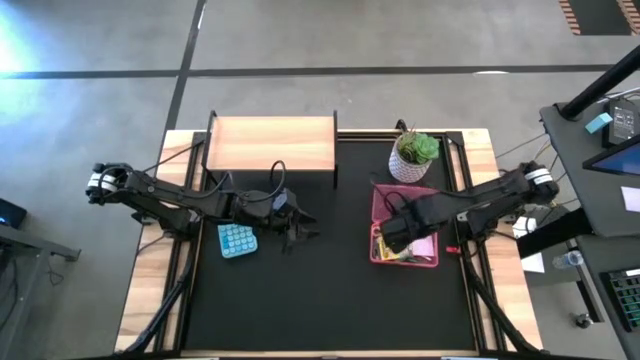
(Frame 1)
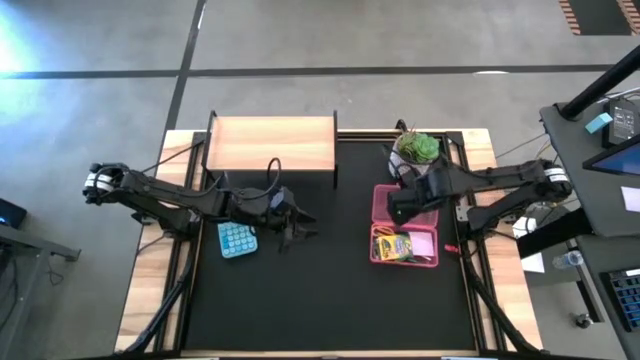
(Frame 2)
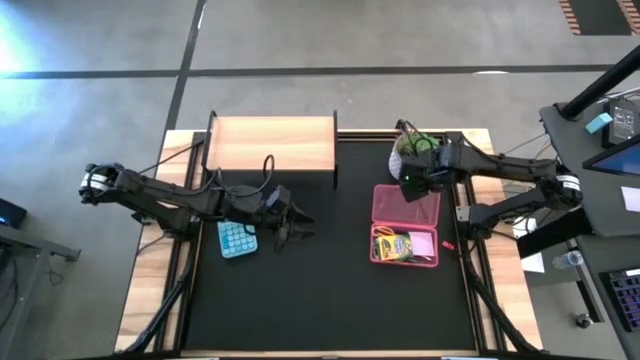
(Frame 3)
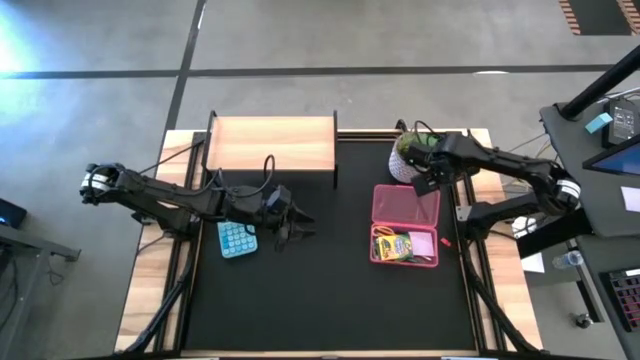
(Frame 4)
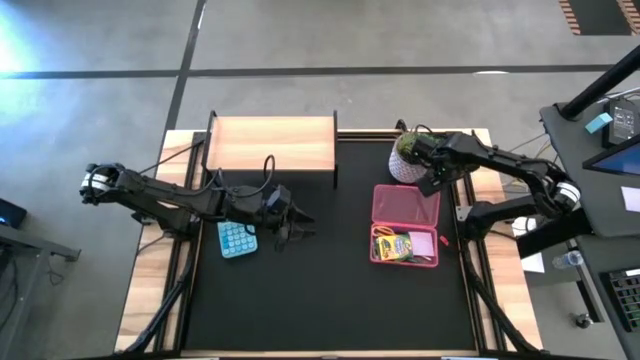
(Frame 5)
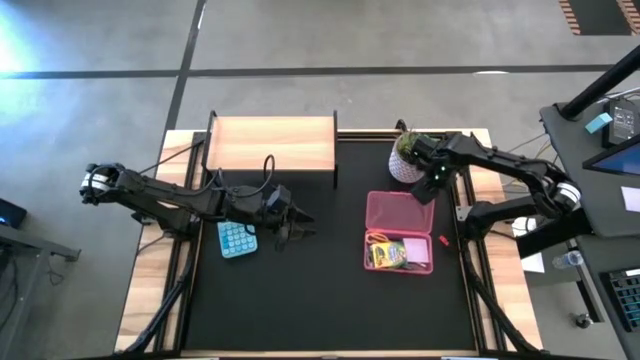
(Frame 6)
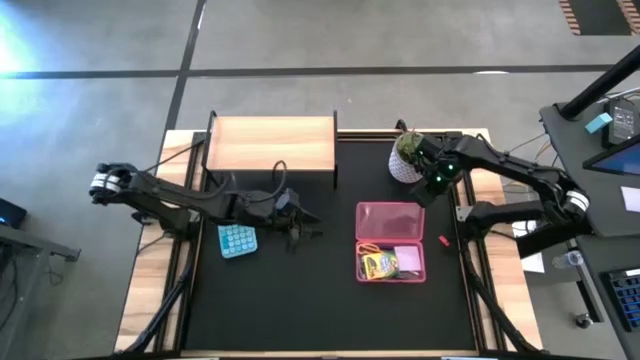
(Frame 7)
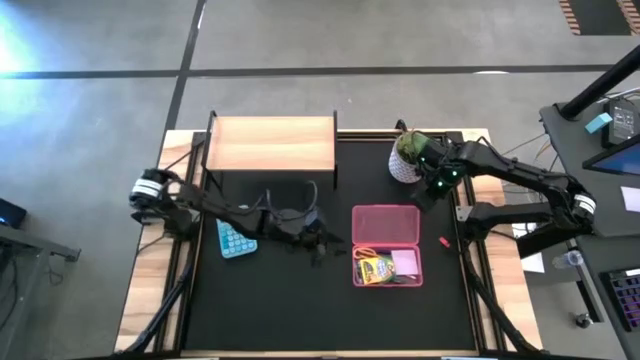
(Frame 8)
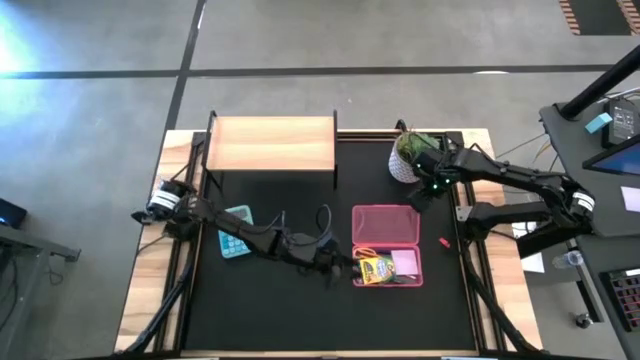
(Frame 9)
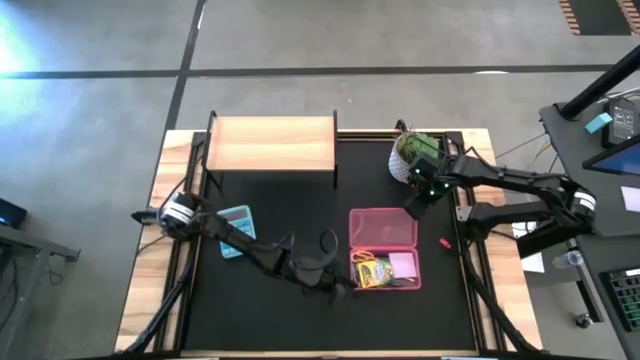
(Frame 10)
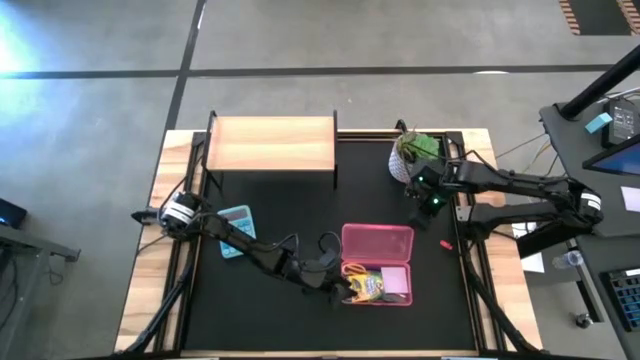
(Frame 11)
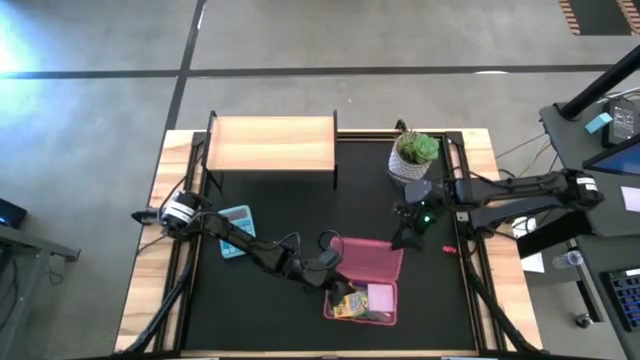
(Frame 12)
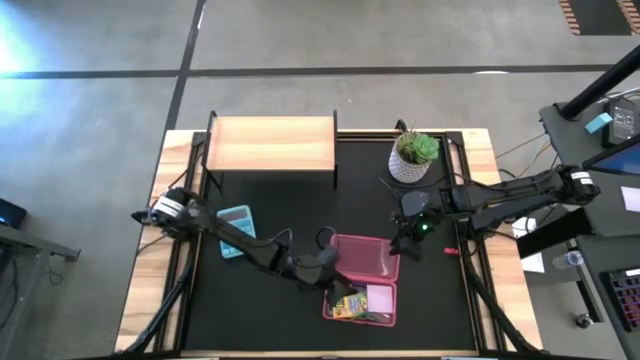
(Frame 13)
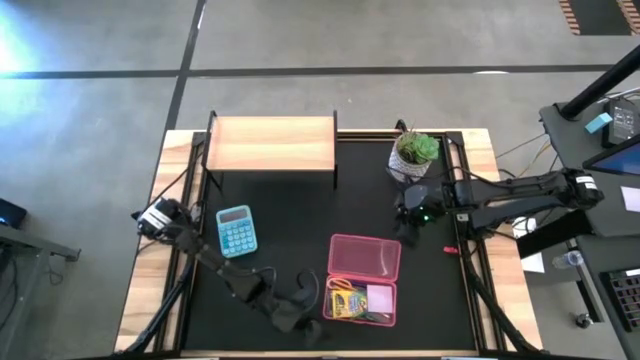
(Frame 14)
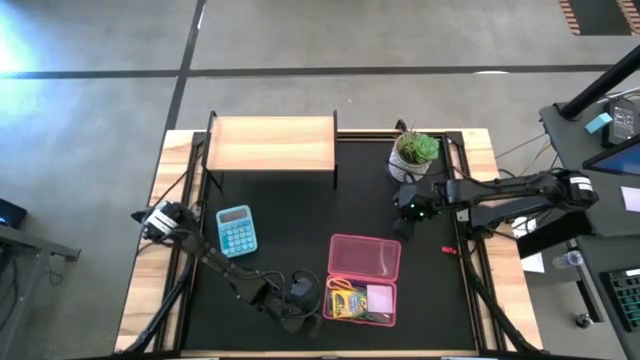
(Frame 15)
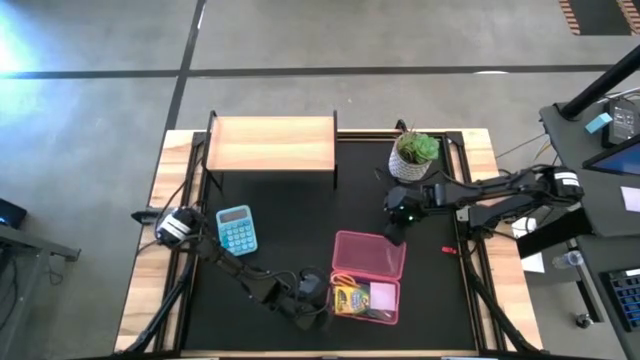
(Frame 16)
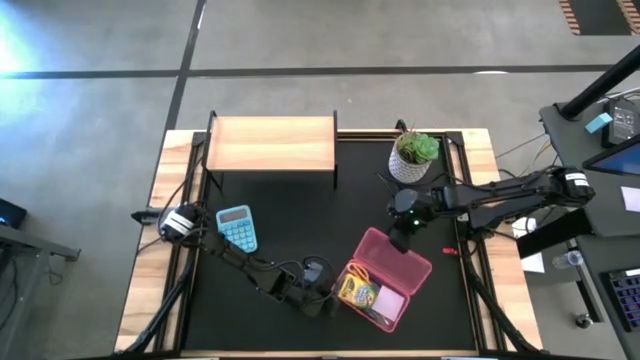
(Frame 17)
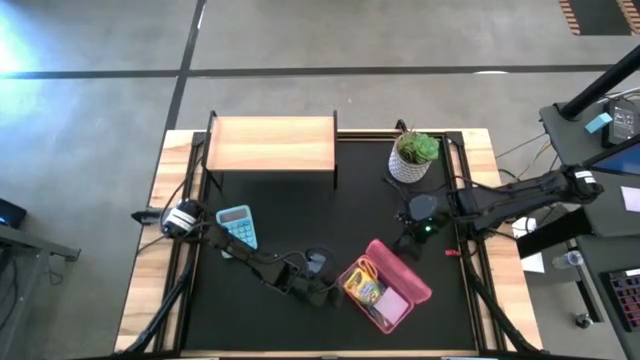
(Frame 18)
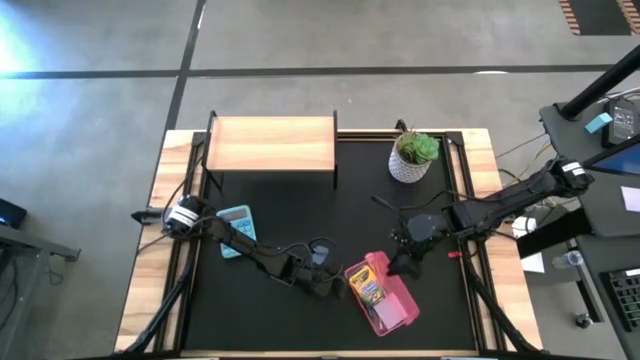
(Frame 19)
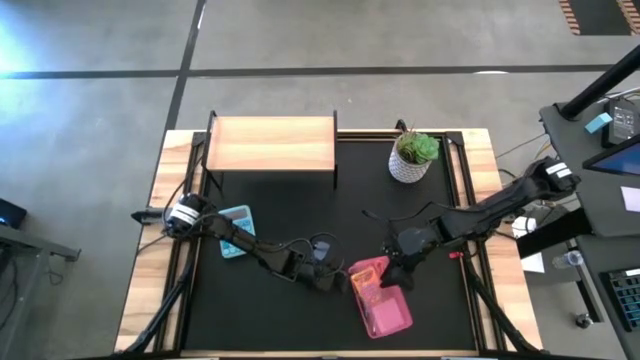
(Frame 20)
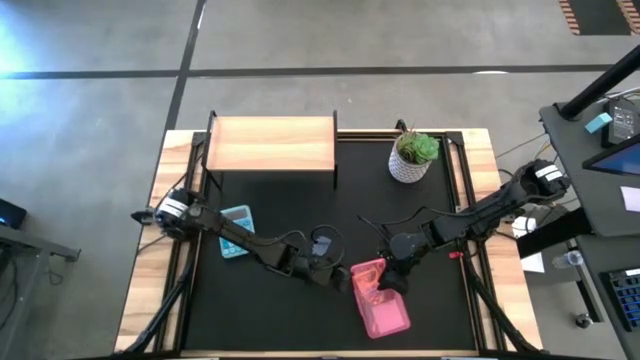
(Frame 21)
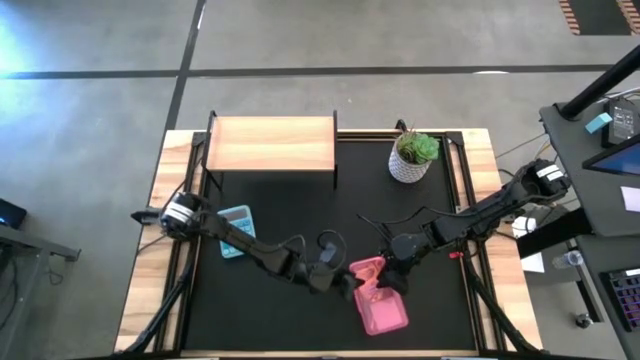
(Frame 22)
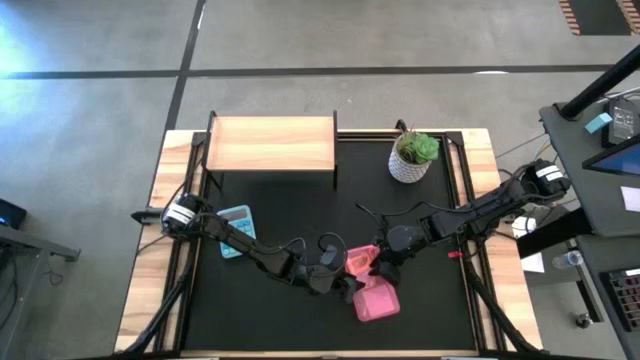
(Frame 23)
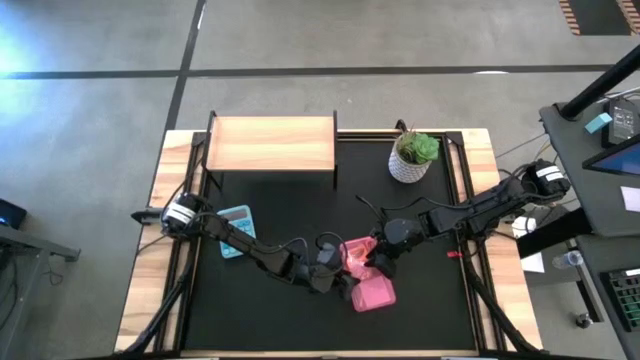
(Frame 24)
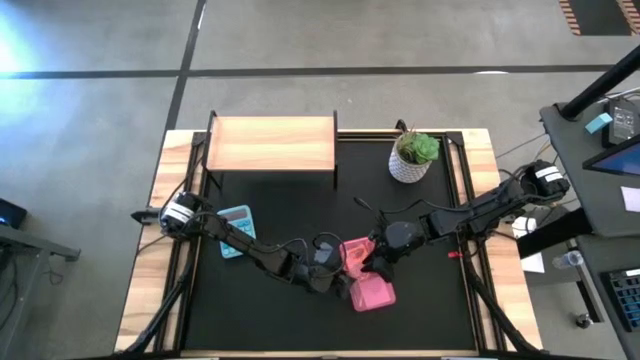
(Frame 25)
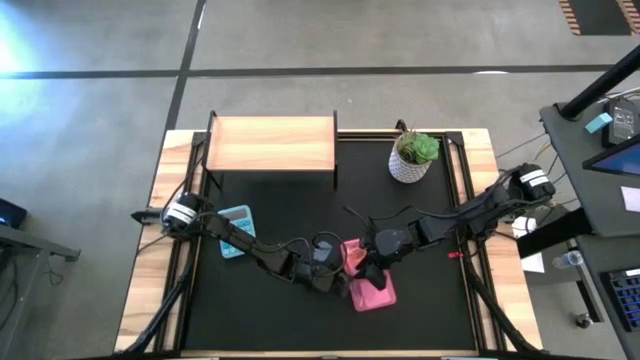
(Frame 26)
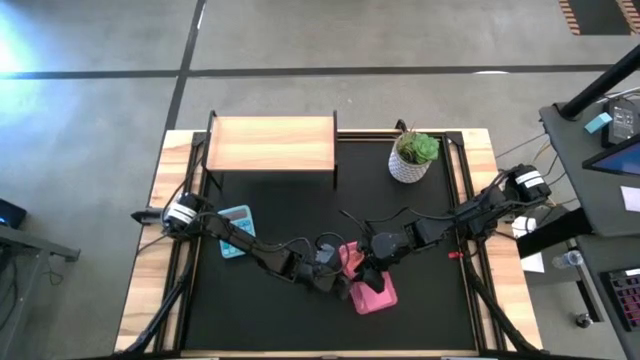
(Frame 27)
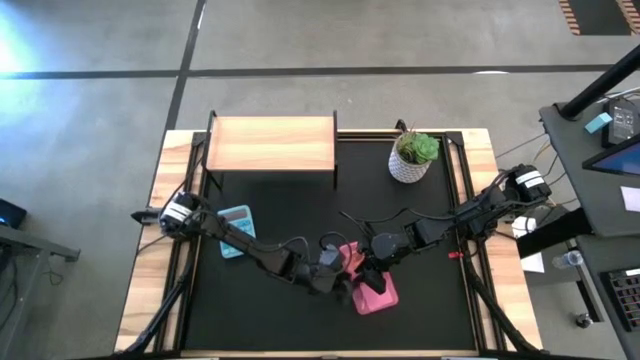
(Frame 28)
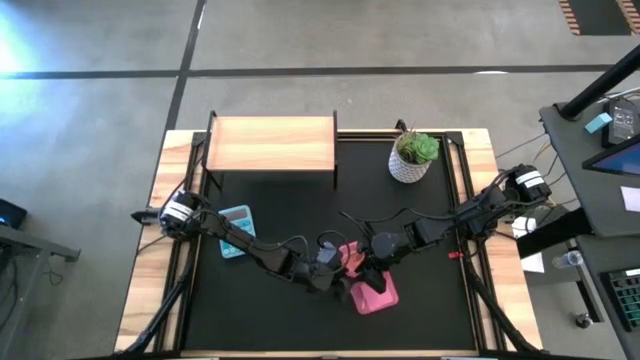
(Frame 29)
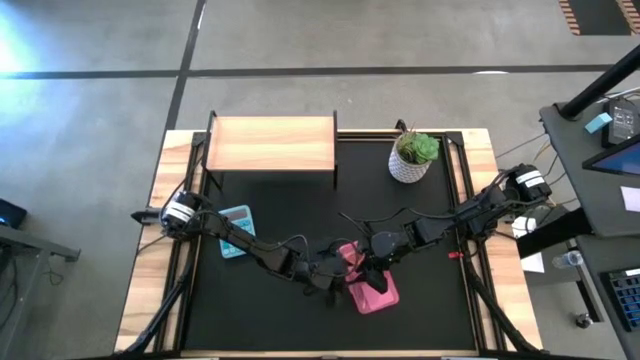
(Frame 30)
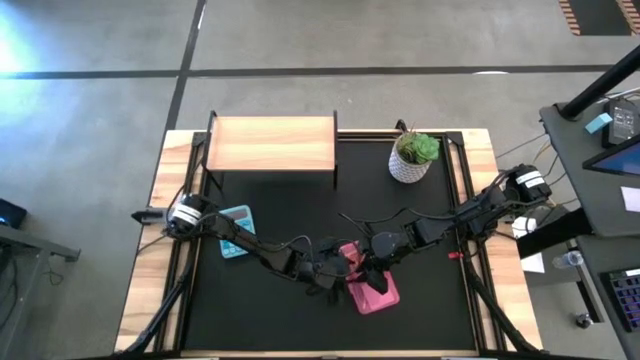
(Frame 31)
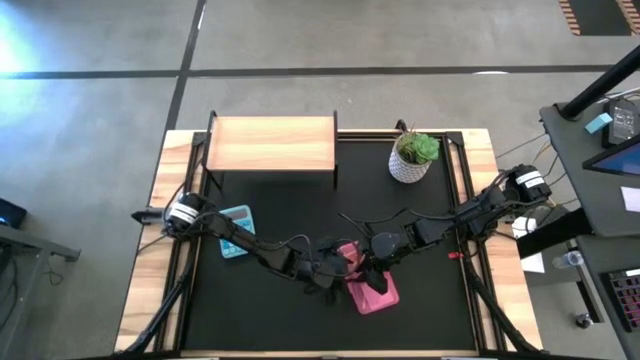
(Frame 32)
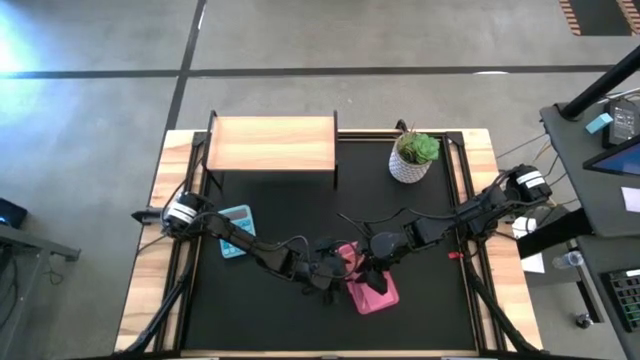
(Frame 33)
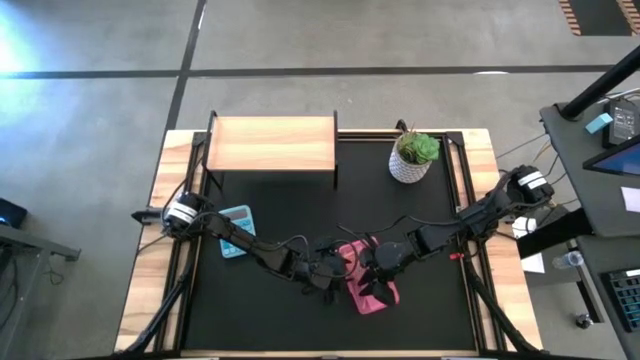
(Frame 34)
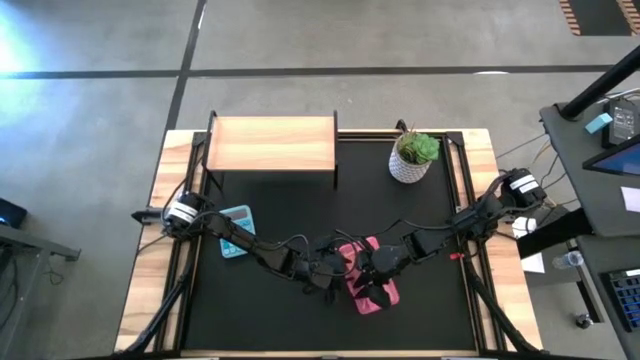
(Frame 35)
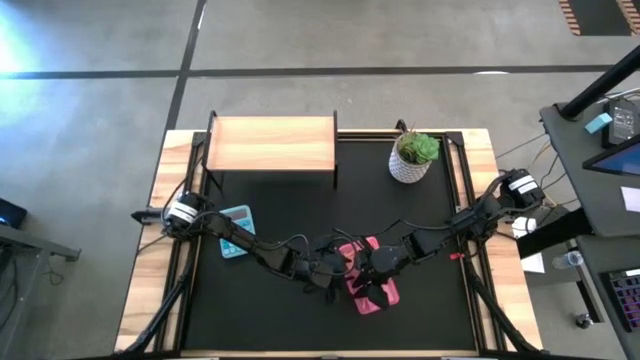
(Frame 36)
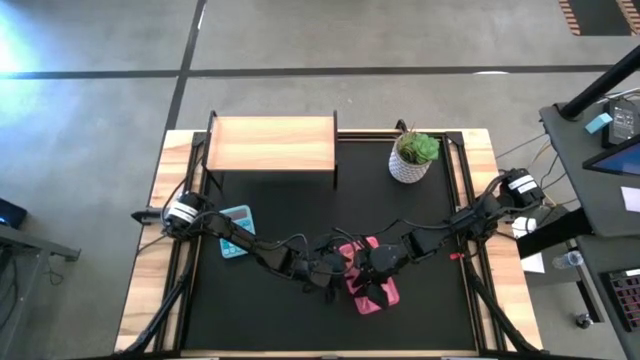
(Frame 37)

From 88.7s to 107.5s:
Task: Pack school essentials
Close the pink case

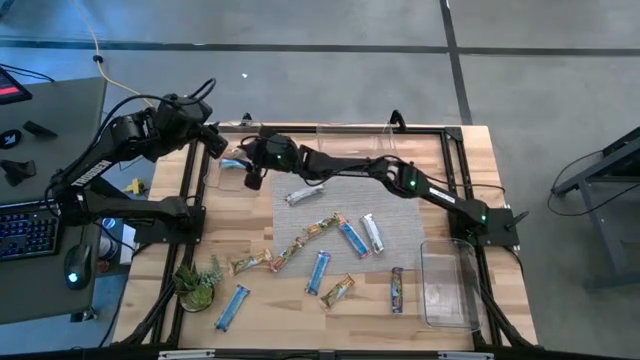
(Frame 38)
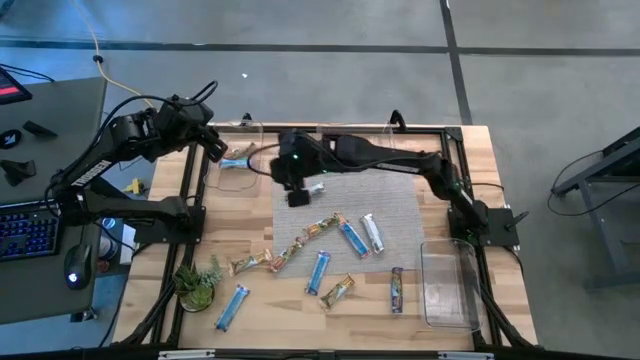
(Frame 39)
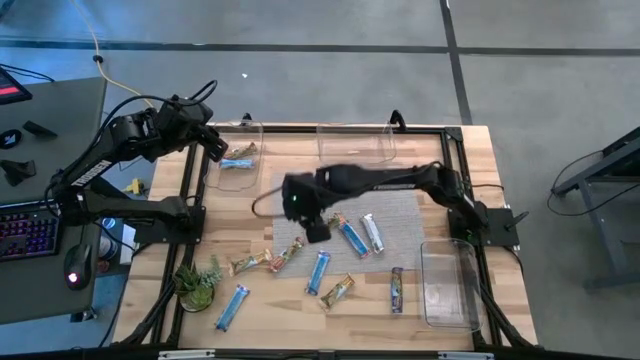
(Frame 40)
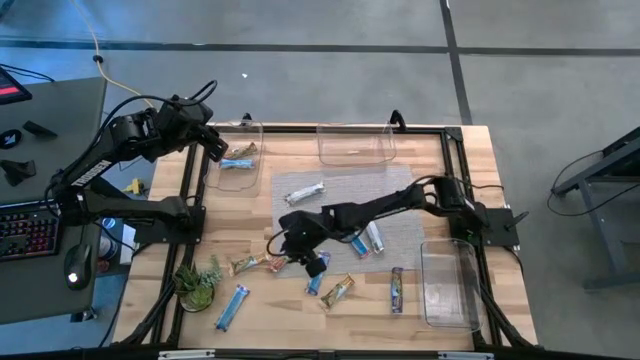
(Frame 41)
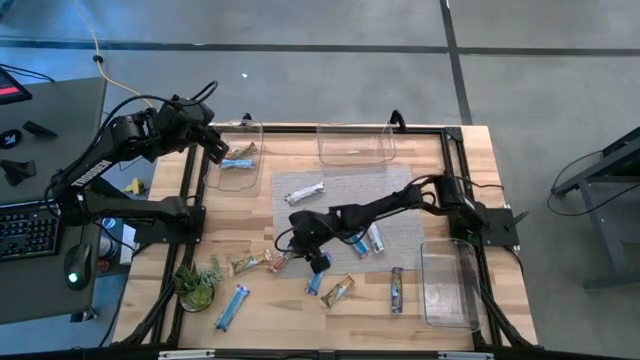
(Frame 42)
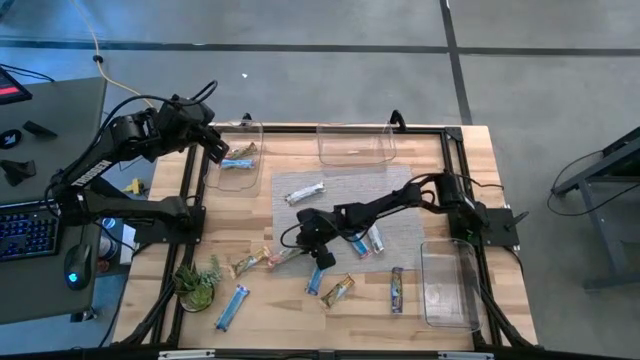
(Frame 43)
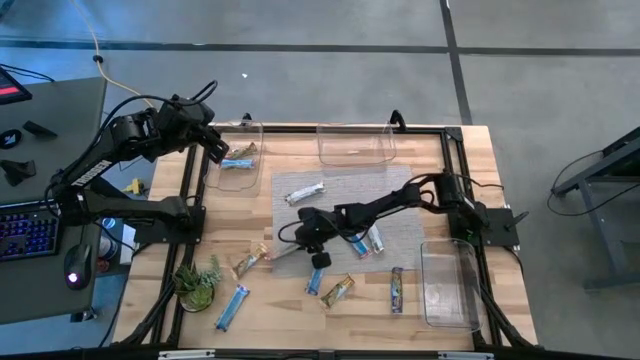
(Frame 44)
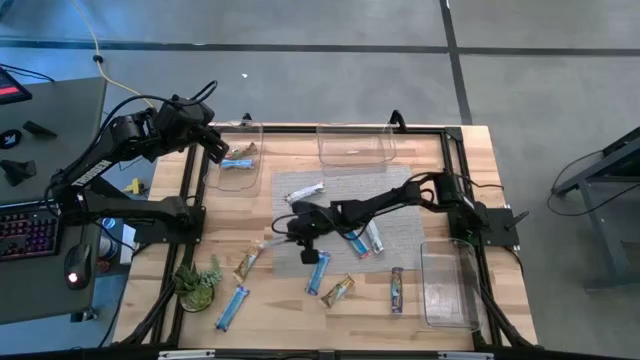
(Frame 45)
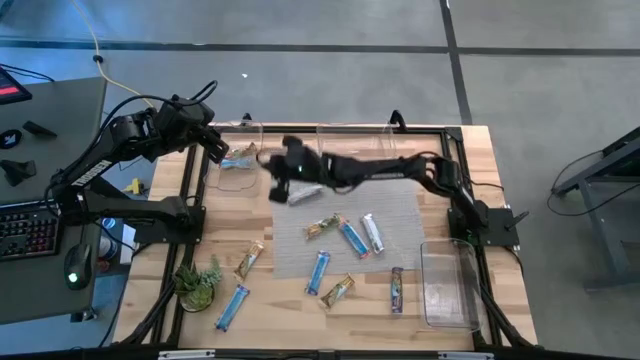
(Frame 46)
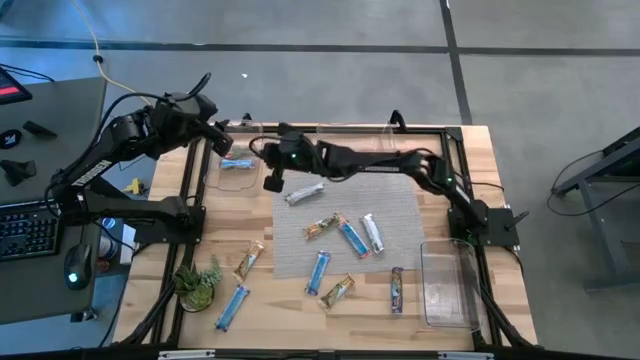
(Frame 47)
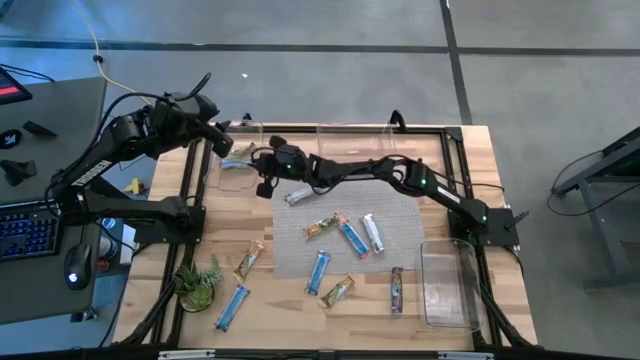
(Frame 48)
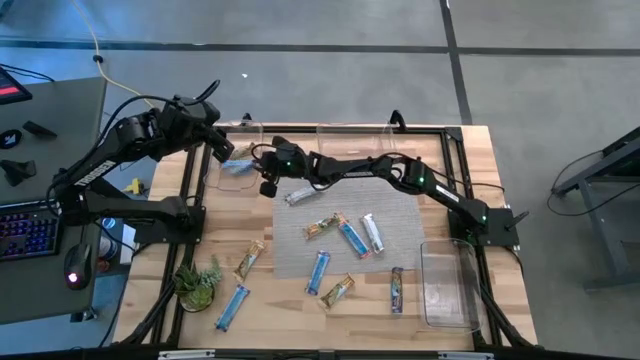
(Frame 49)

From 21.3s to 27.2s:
Task: Pick and place Granola Bars by type
Put the red granola bar into the top left transparent bin
